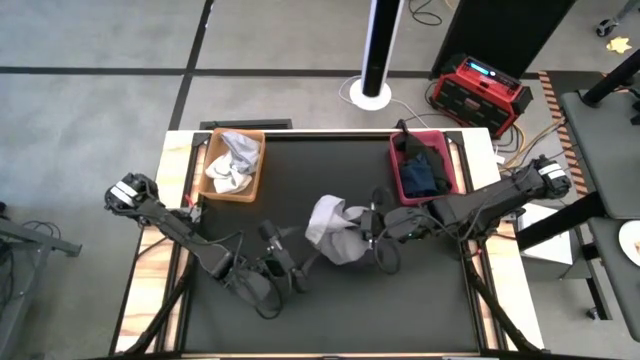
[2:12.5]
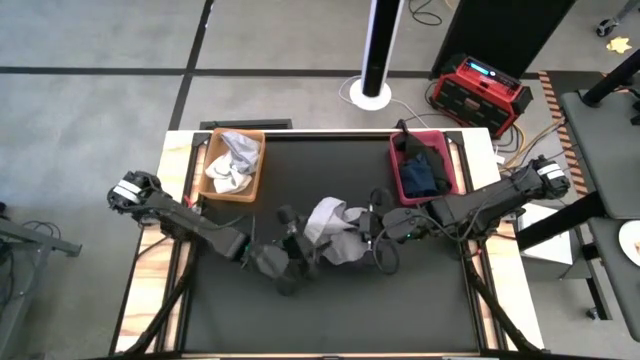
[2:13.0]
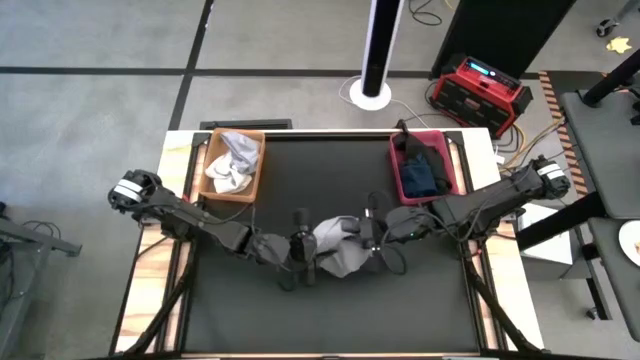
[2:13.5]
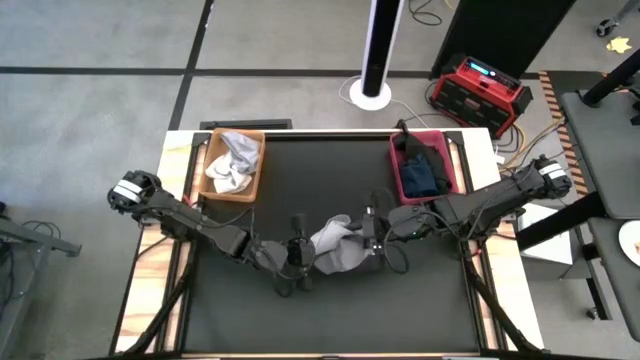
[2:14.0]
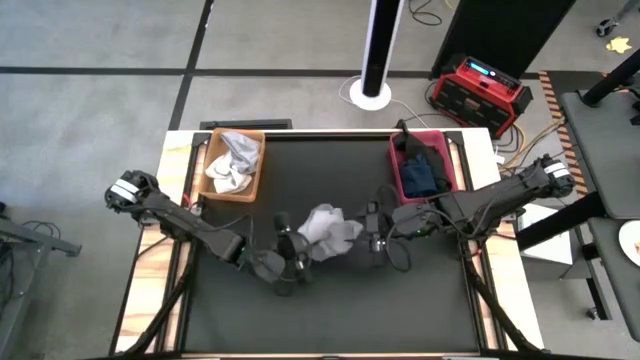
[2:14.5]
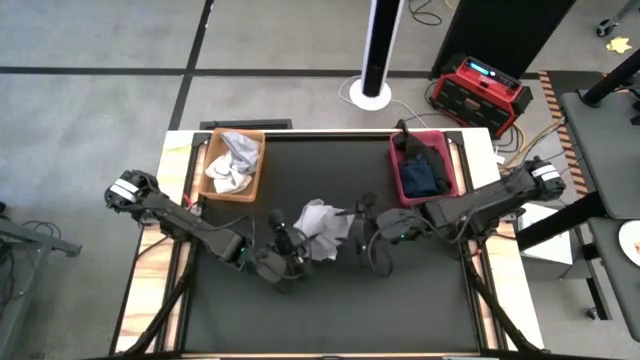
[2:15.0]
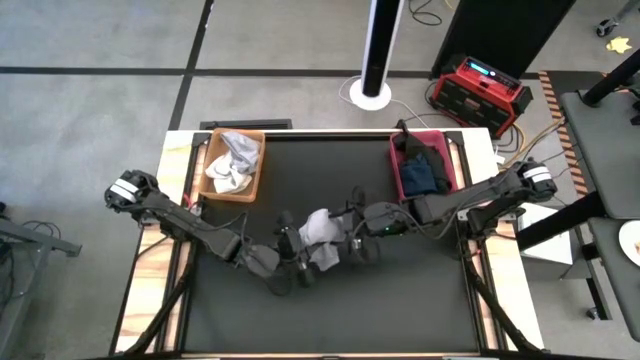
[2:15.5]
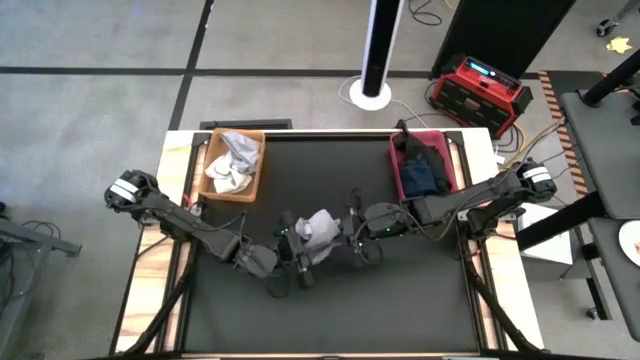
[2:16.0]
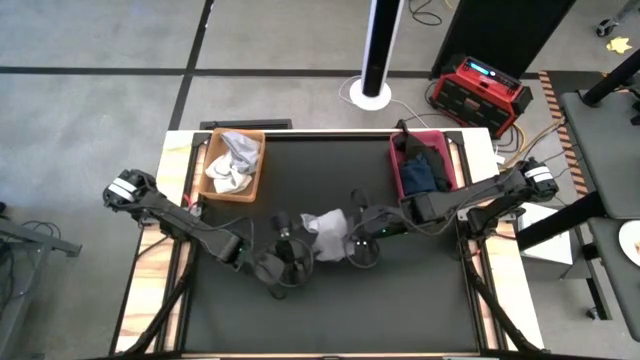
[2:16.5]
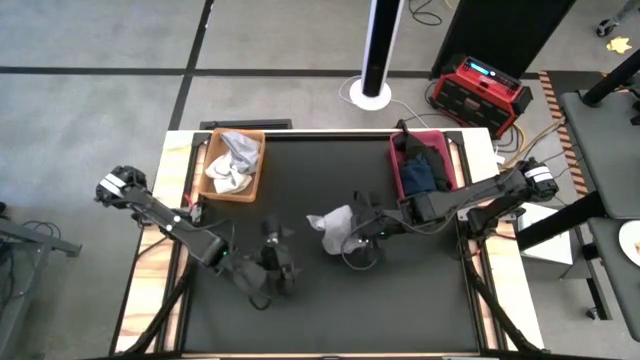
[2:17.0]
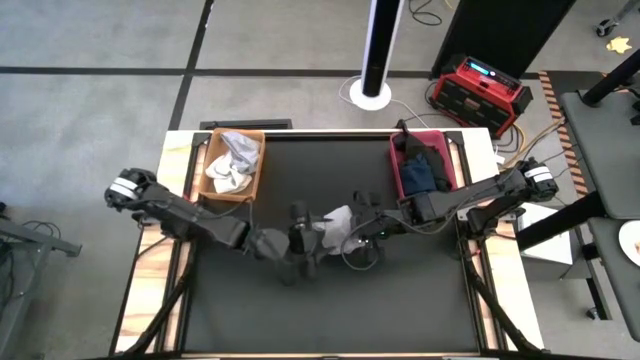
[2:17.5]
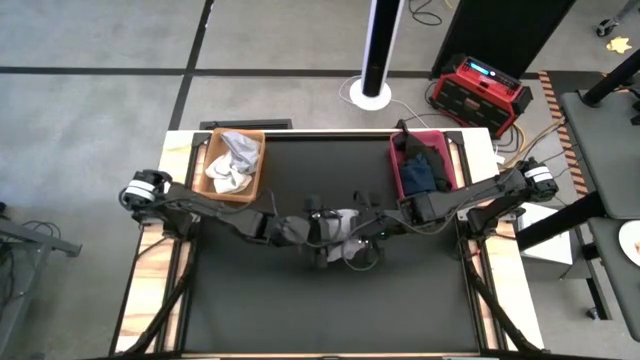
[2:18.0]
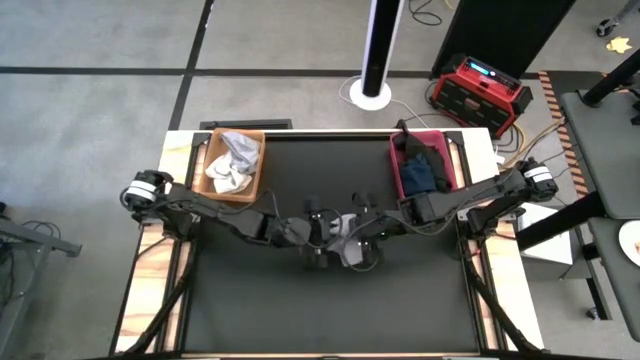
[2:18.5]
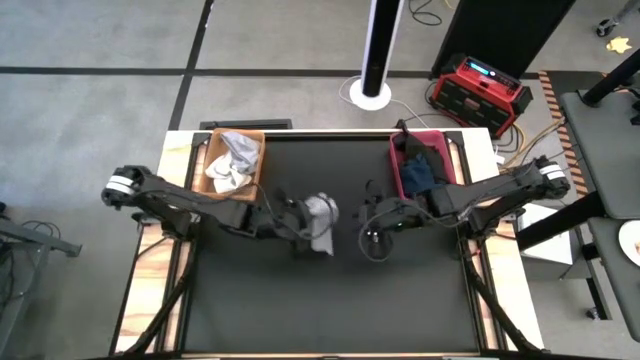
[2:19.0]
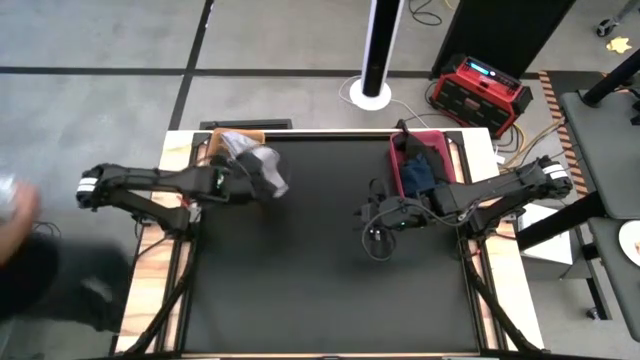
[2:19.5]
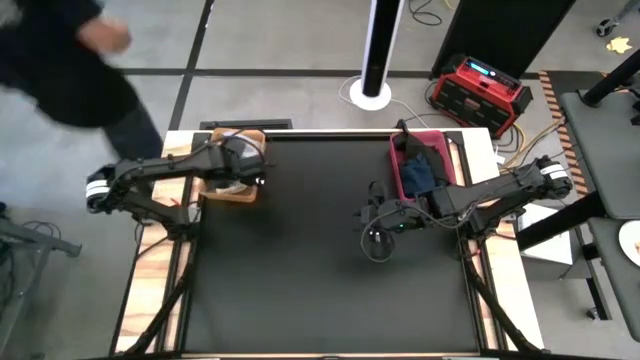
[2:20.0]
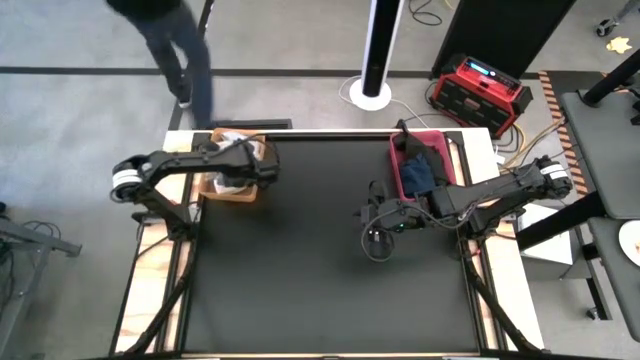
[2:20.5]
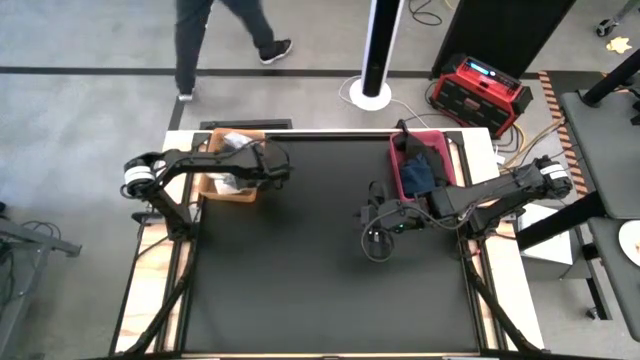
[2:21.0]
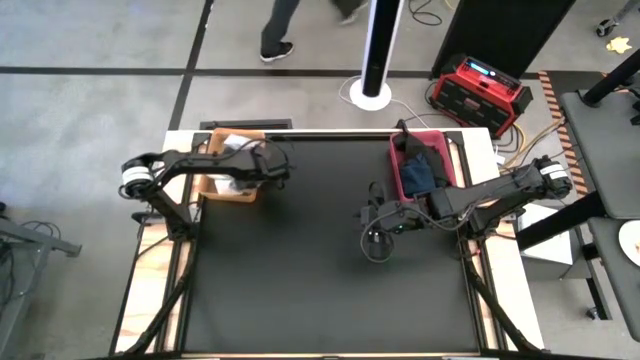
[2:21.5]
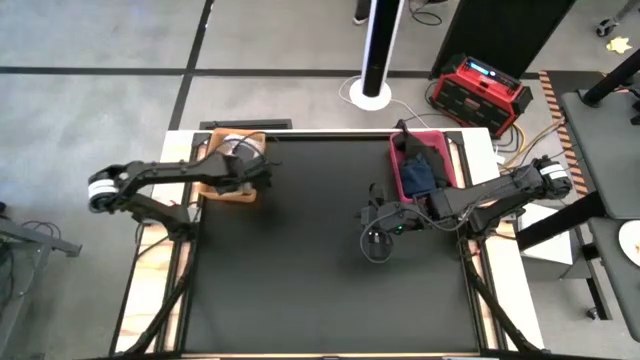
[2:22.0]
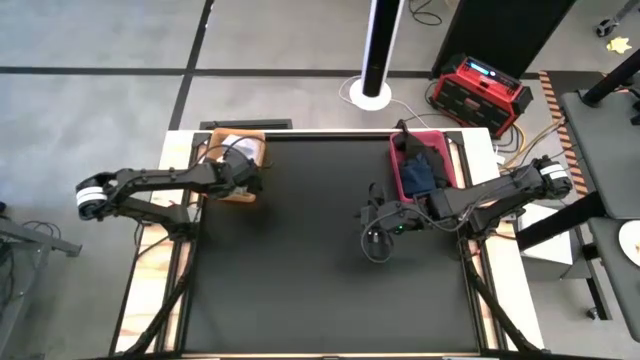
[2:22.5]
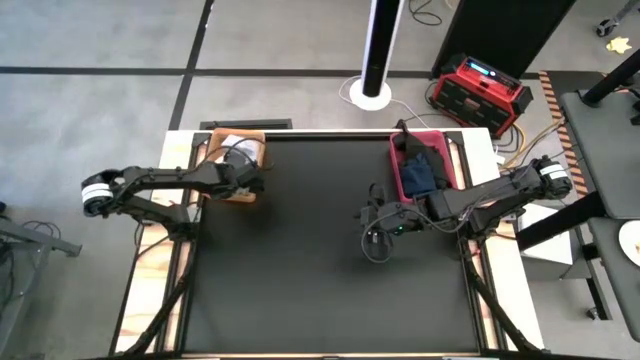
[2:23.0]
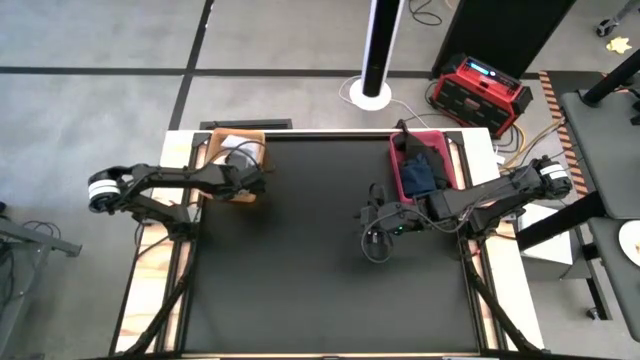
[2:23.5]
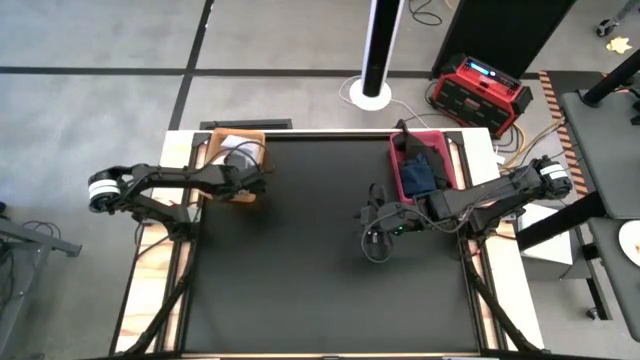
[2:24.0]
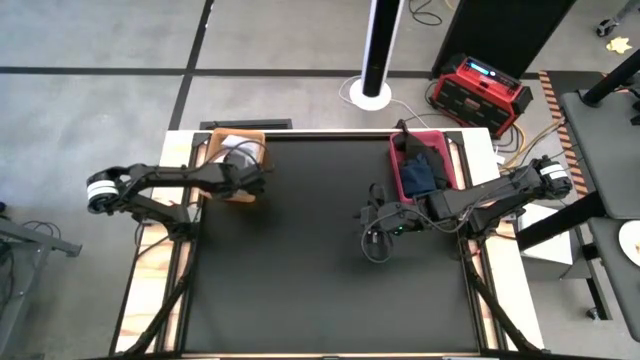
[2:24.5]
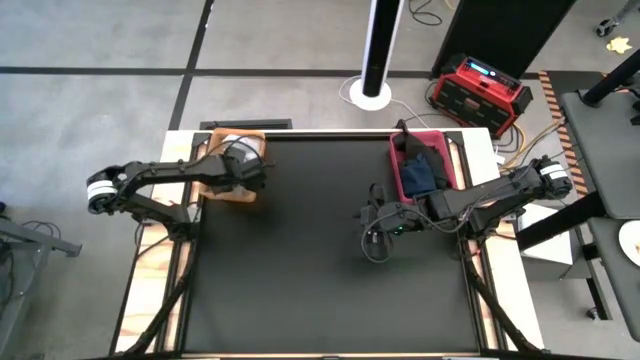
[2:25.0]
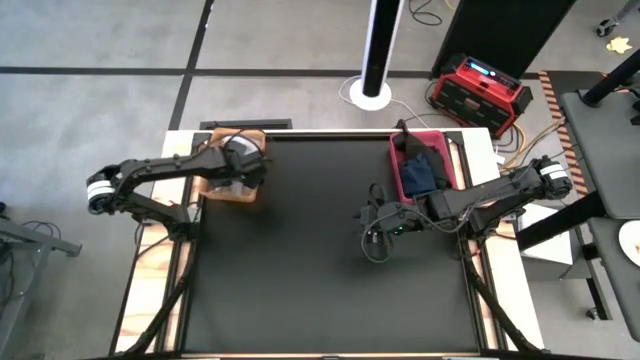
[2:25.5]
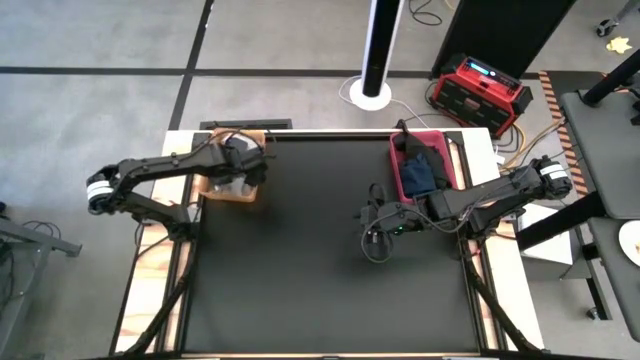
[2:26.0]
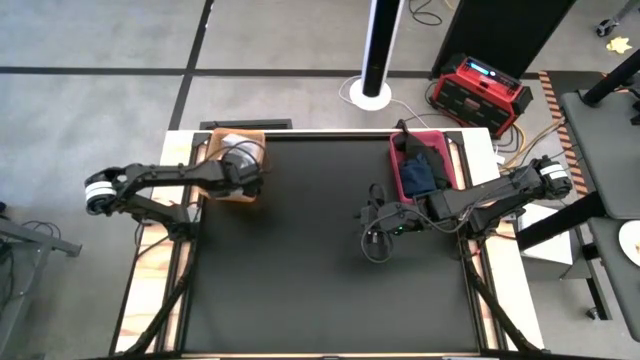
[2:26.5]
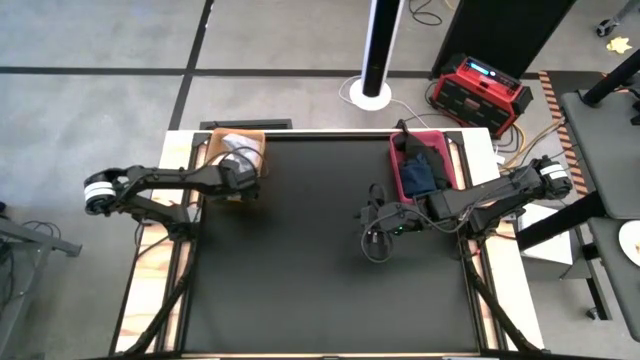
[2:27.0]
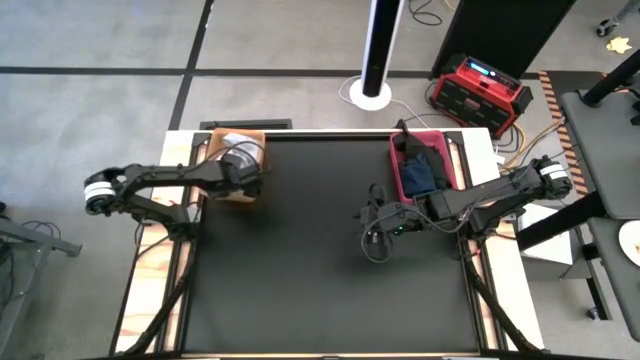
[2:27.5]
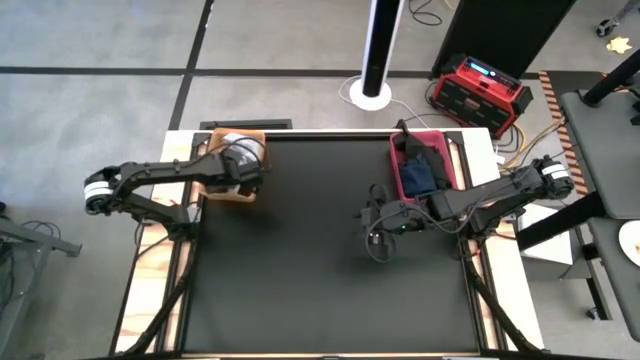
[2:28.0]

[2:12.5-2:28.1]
Task: Sort towels by color in basket
Put the gray towel into the orange bin

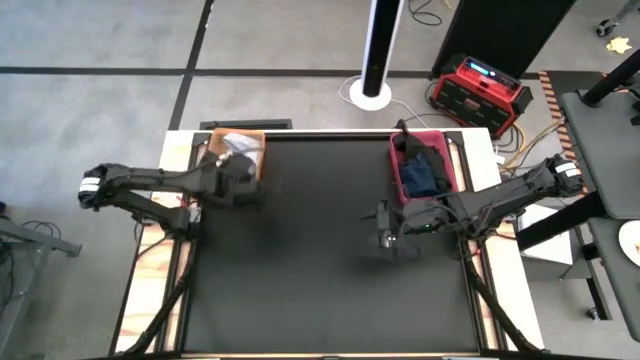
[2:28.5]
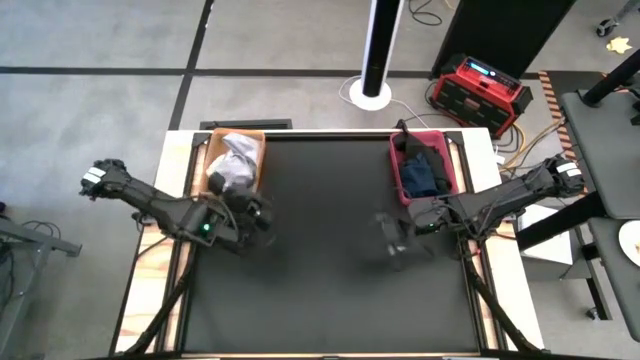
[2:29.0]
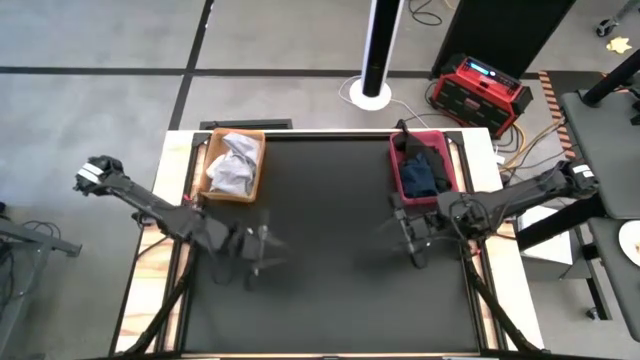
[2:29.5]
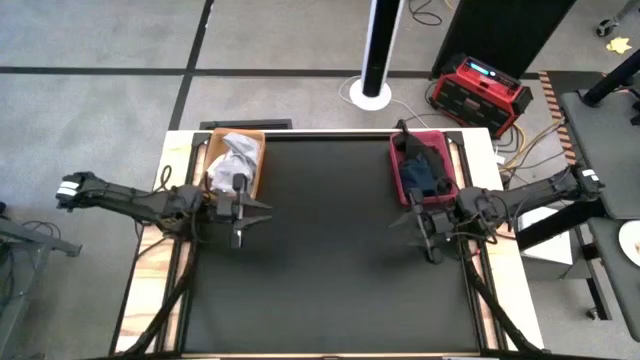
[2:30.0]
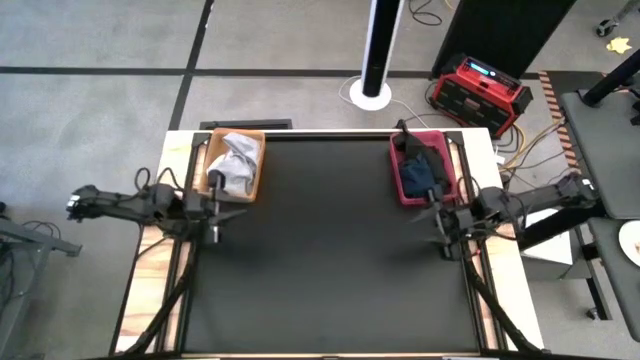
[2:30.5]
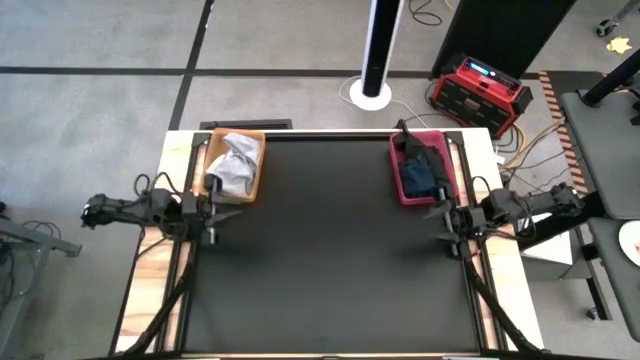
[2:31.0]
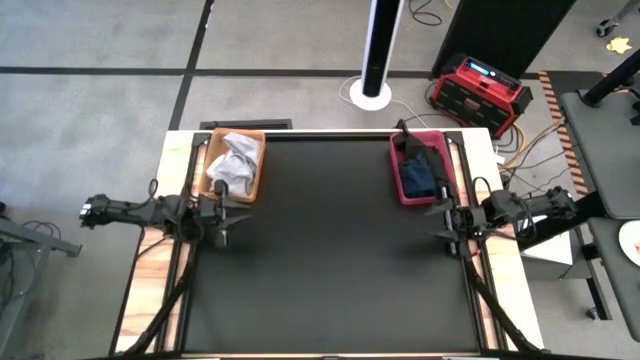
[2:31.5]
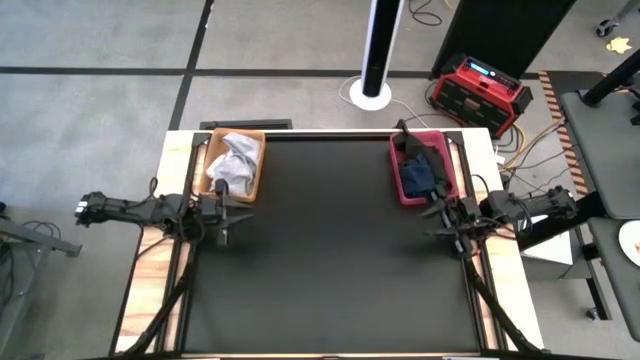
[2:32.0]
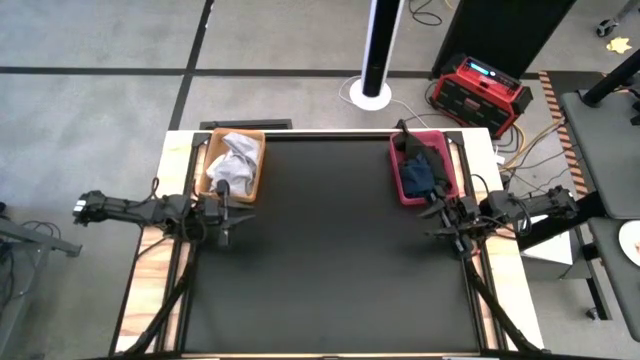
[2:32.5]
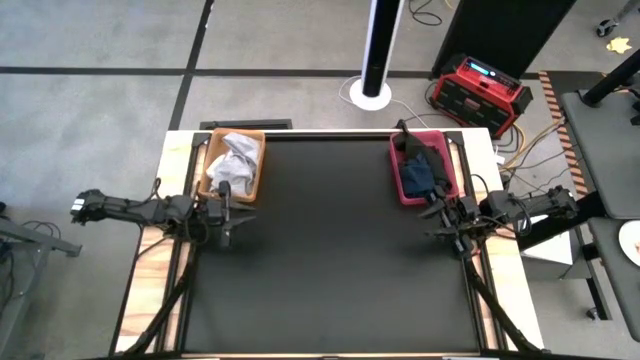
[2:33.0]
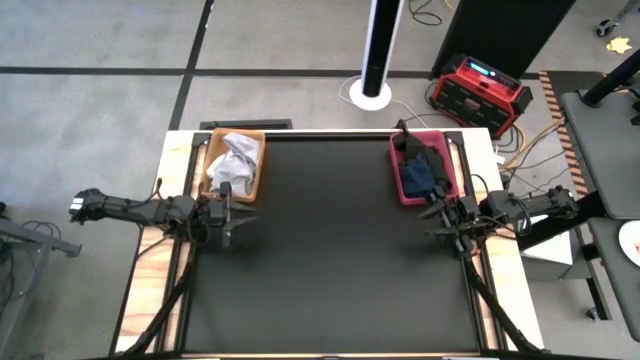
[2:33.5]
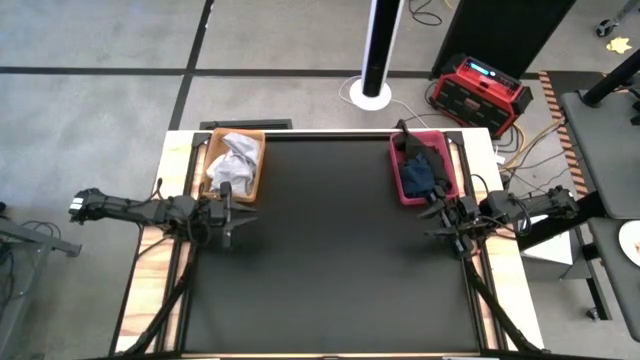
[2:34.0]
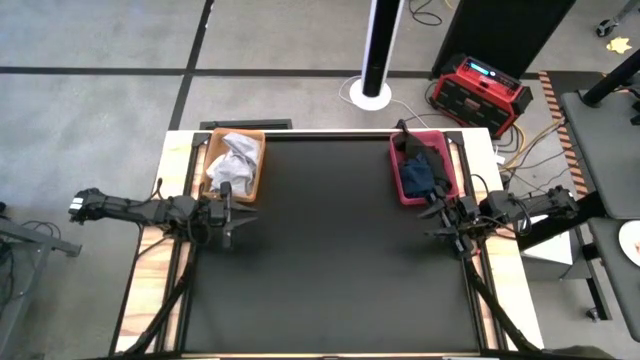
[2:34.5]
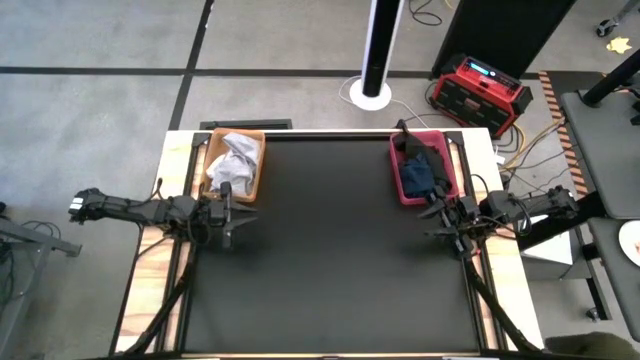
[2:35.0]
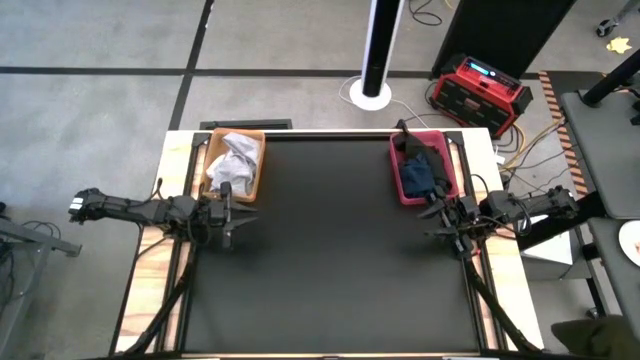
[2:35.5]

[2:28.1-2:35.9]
Return to Home Position
